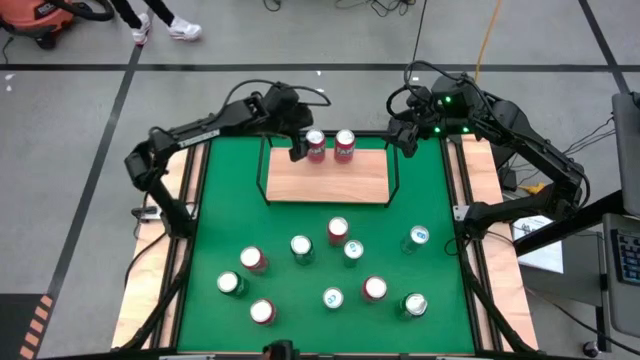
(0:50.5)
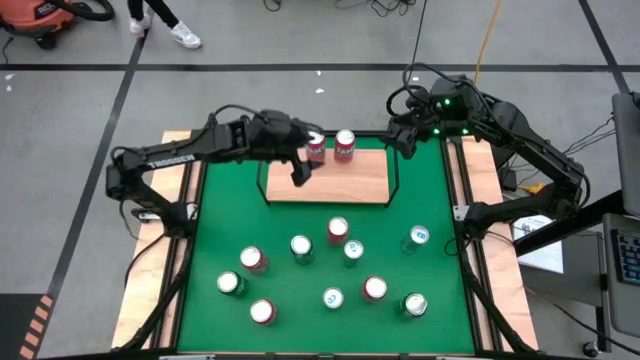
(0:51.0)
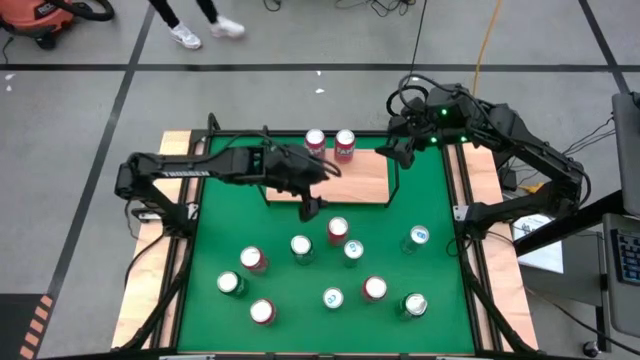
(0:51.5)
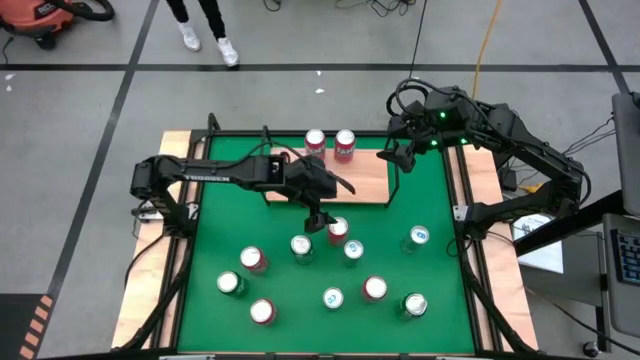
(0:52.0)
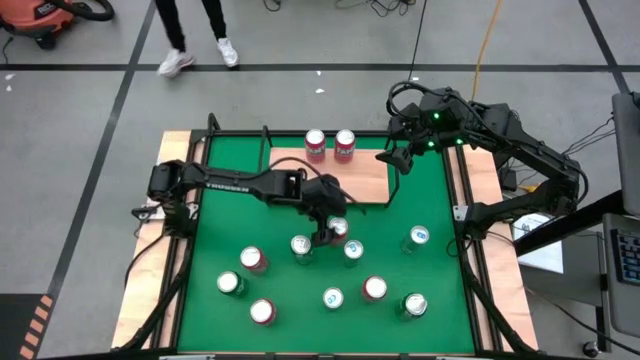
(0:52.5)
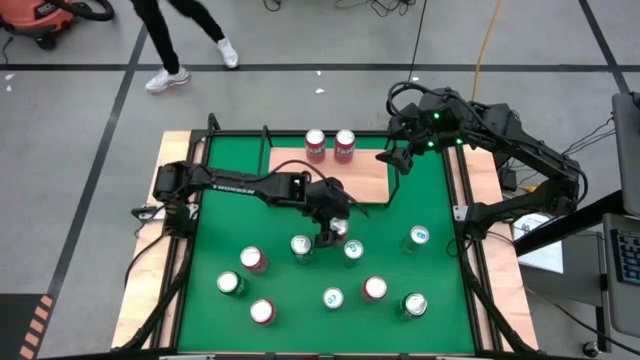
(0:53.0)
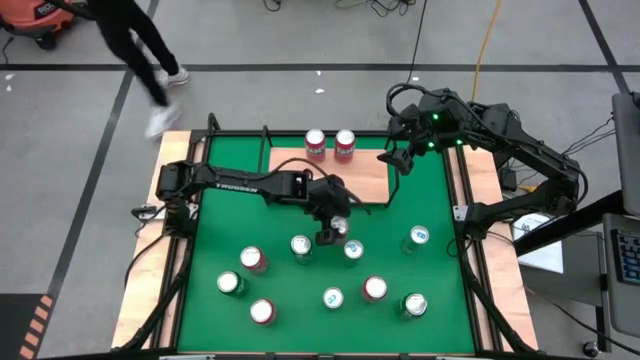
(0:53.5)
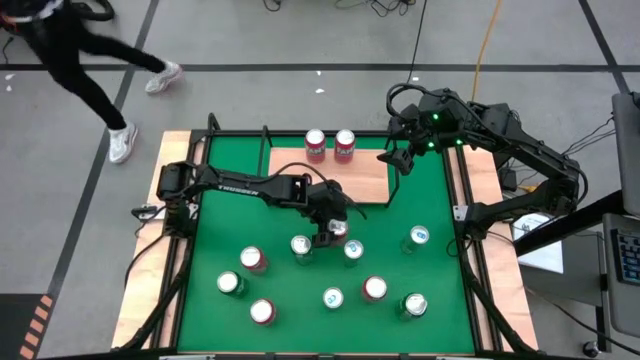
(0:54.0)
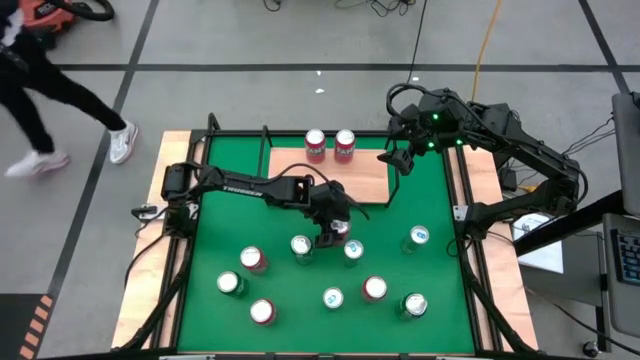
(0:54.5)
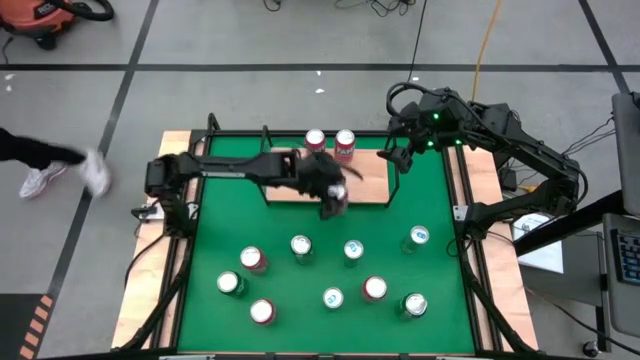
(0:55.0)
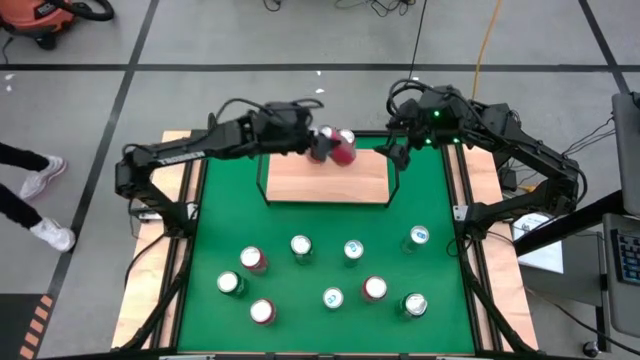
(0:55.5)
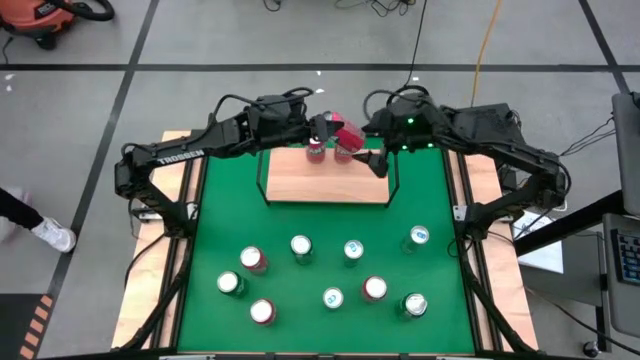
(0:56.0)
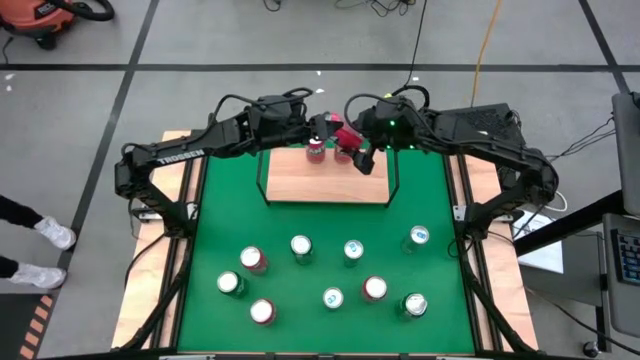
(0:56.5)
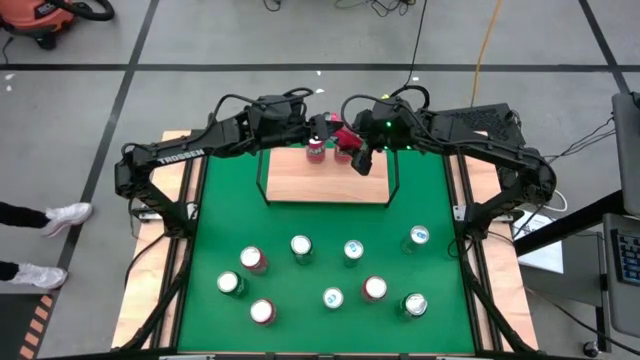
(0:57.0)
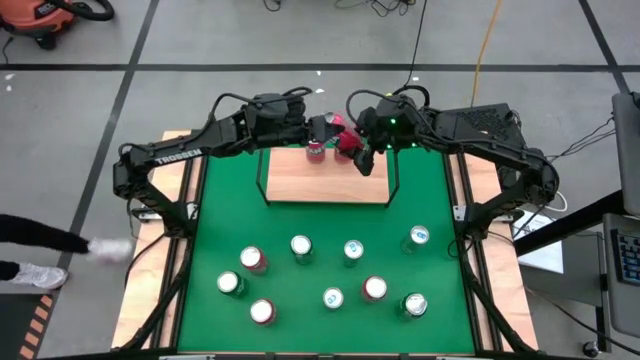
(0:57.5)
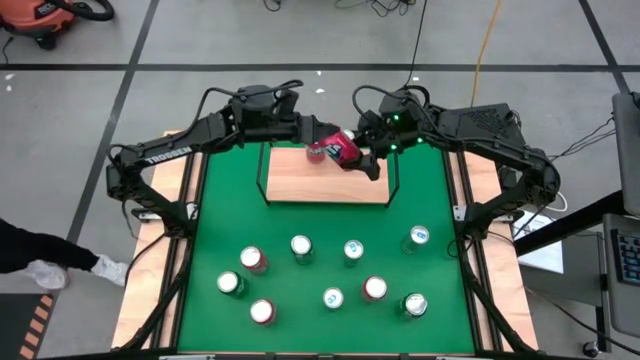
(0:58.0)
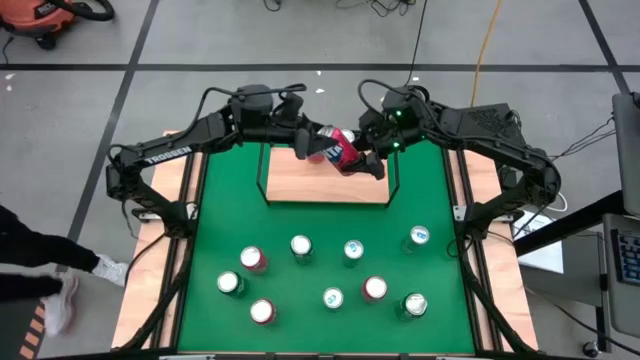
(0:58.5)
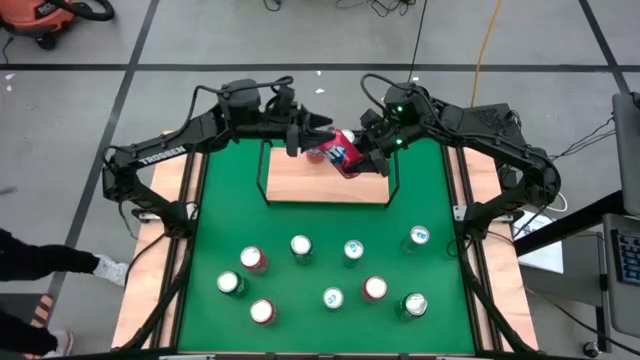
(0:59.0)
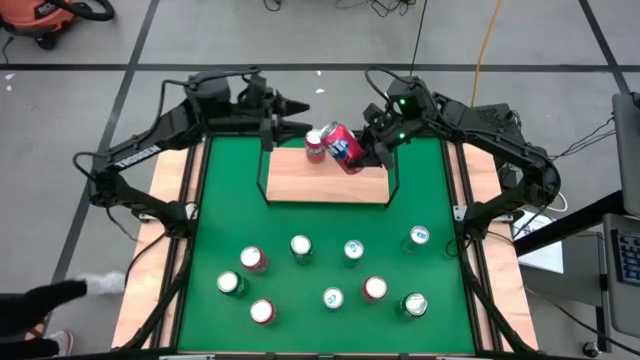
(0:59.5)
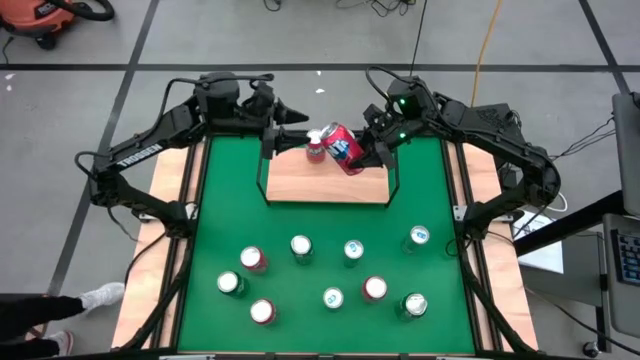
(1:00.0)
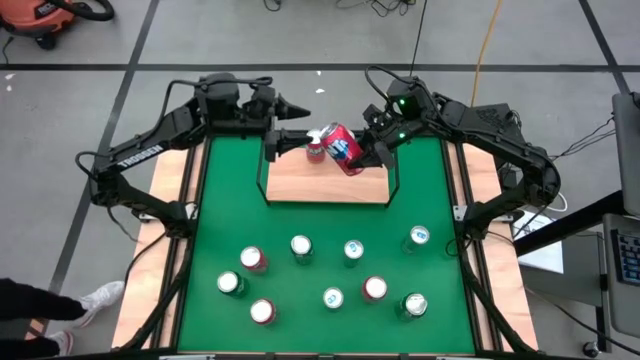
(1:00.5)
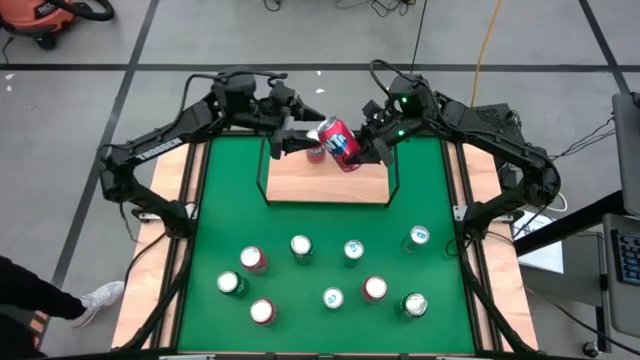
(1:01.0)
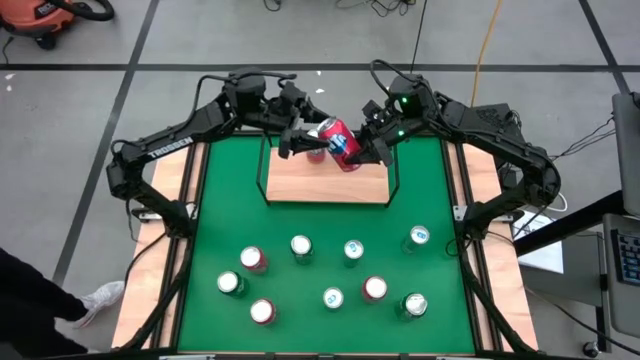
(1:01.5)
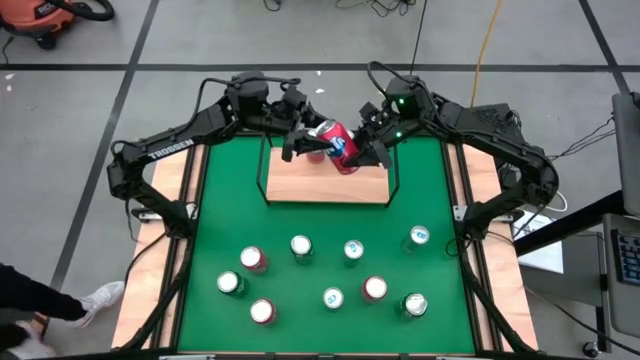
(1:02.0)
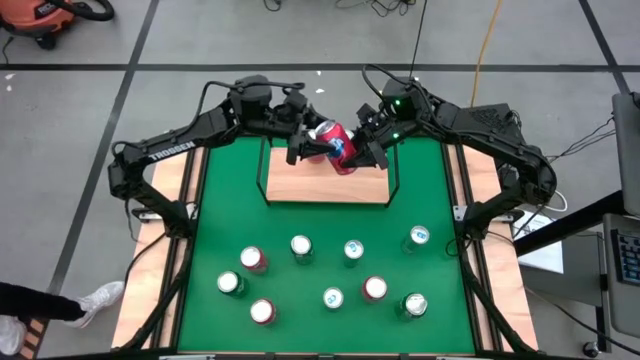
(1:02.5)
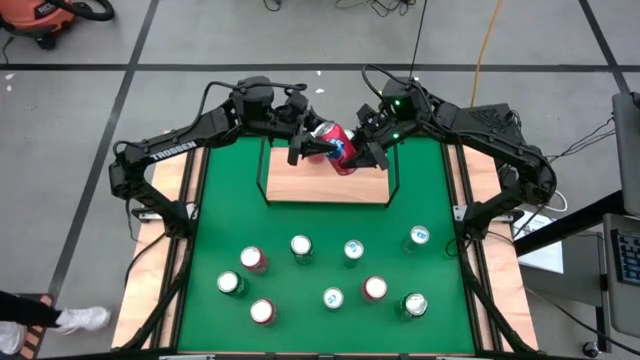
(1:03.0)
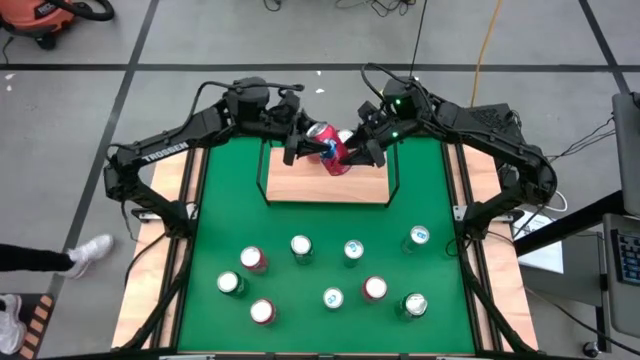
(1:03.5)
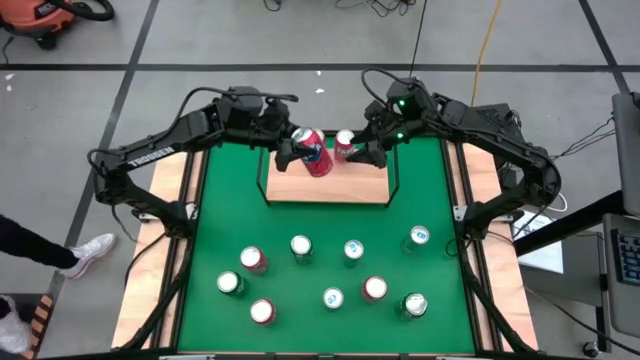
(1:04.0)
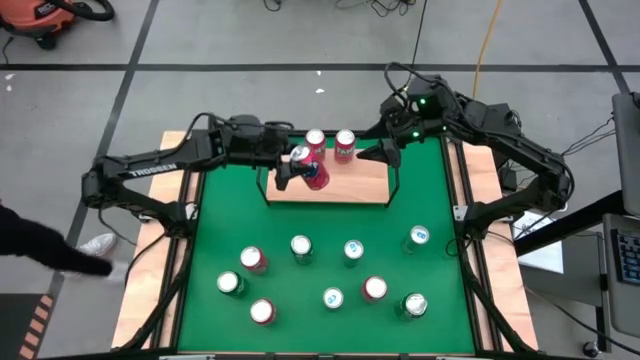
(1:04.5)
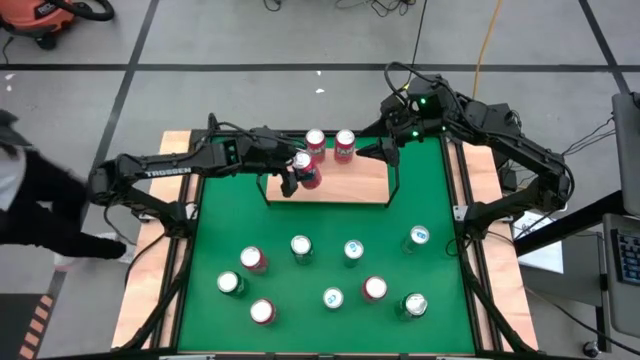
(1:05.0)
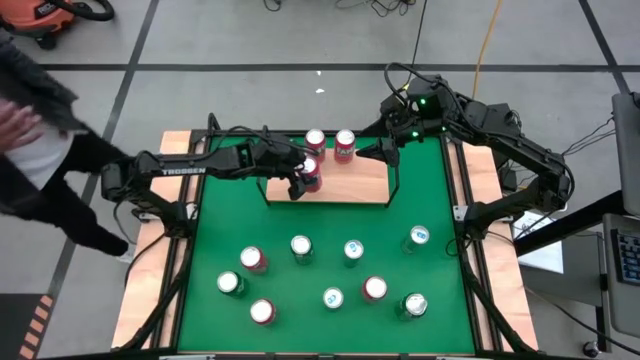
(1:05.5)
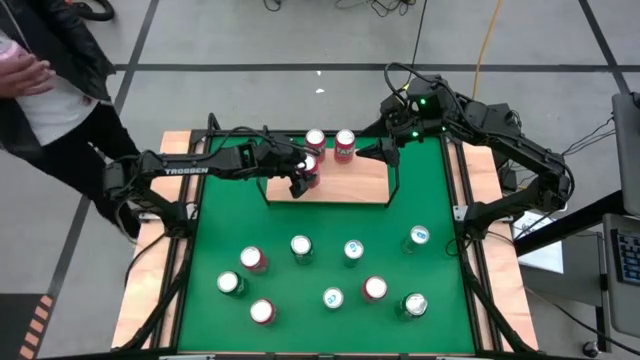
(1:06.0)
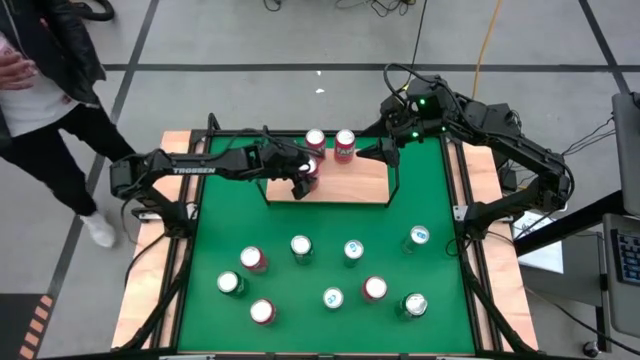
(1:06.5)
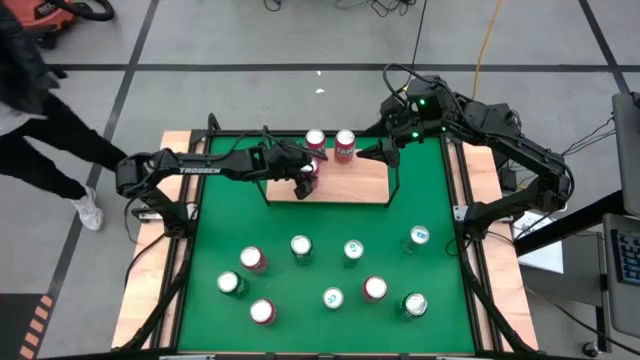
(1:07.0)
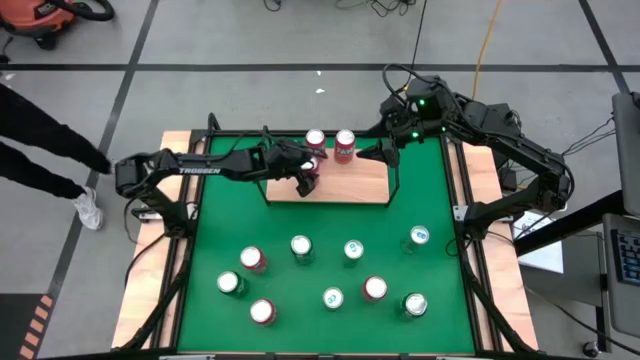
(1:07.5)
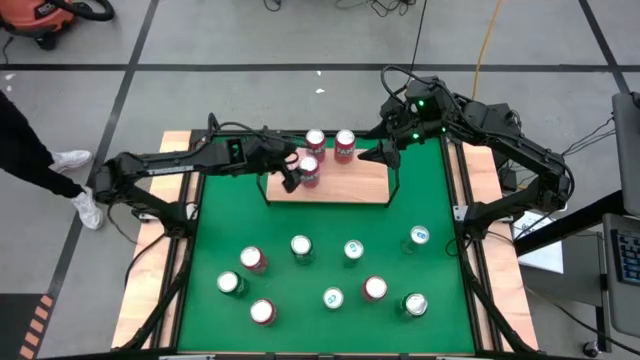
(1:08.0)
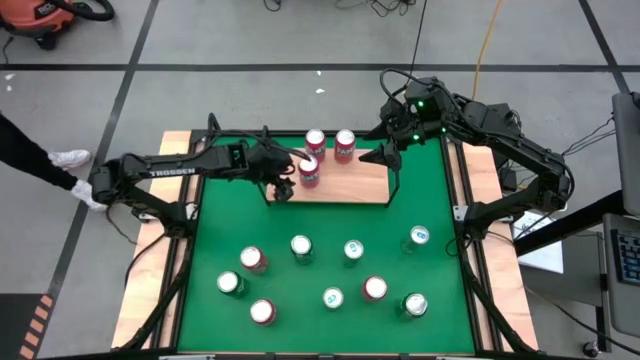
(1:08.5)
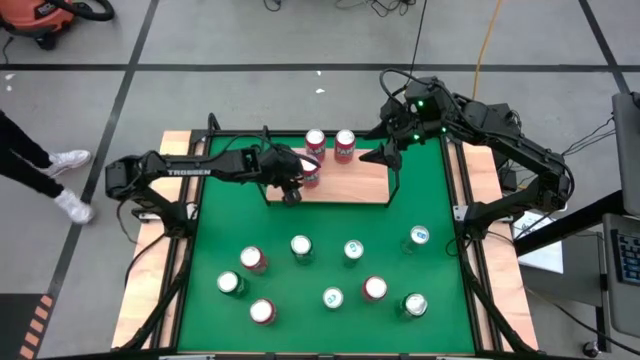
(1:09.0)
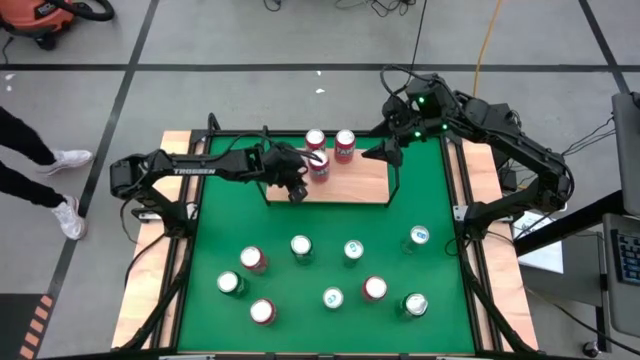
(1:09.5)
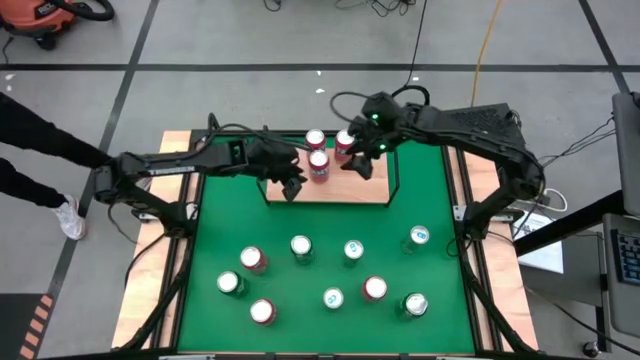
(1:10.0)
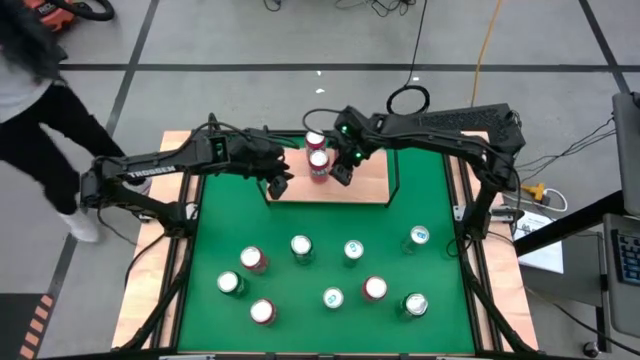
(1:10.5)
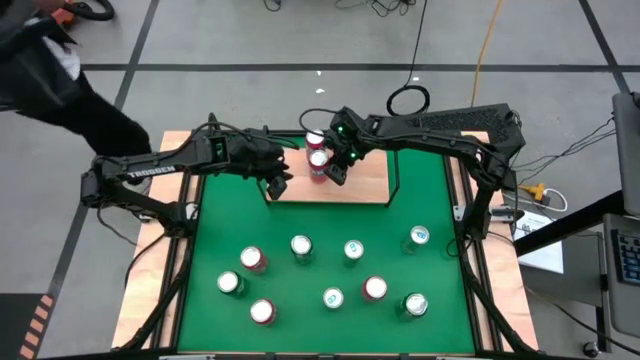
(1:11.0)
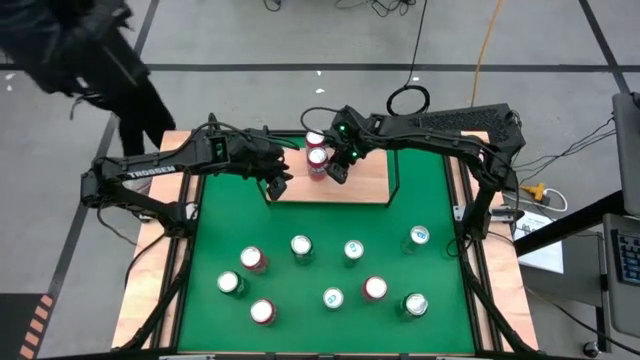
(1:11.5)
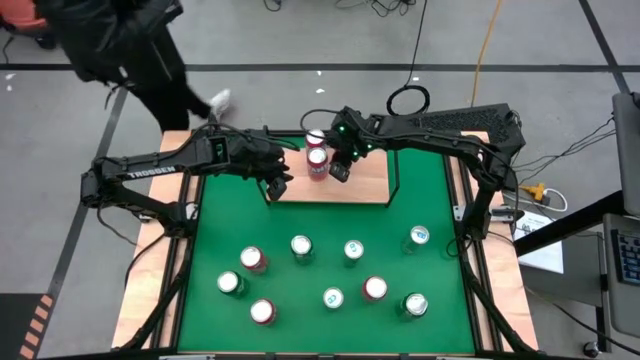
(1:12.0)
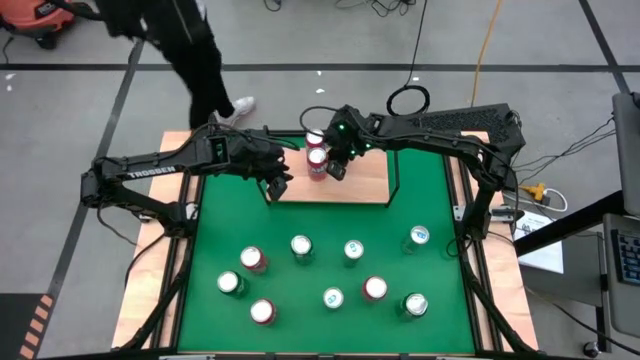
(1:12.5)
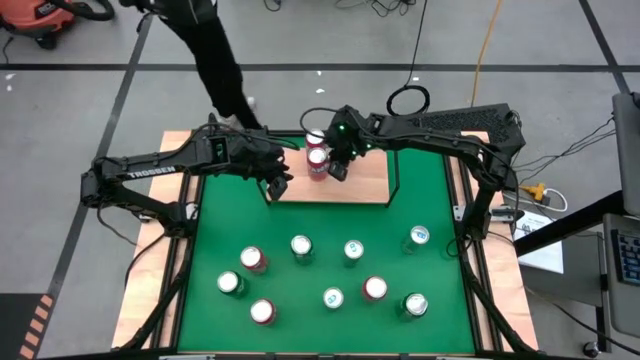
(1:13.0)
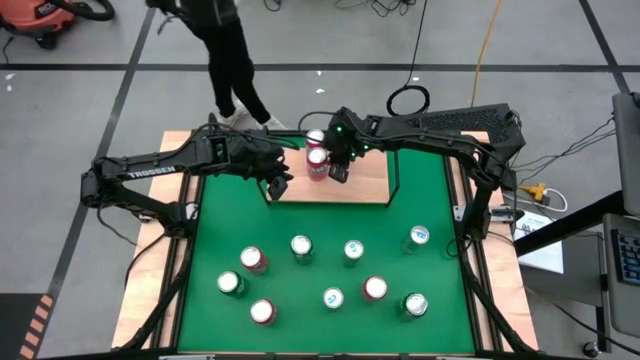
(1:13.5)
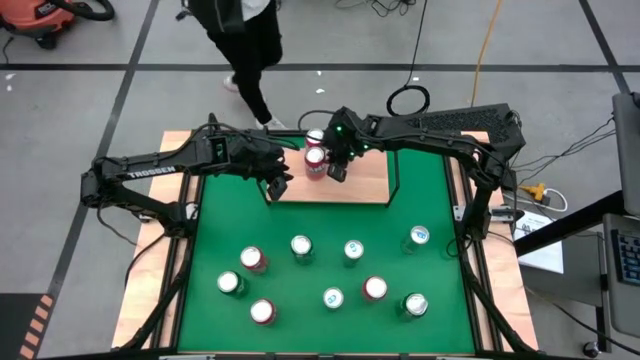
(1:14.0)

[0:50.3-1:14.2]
Task: Place canned beverage on shelf
Put the red soda can on the shelf aligned with the other left red soda can
